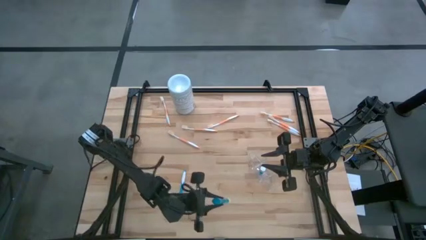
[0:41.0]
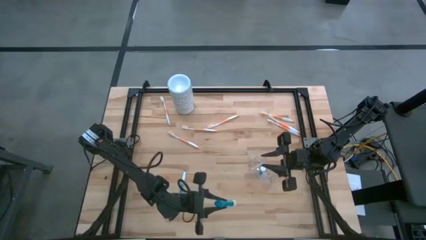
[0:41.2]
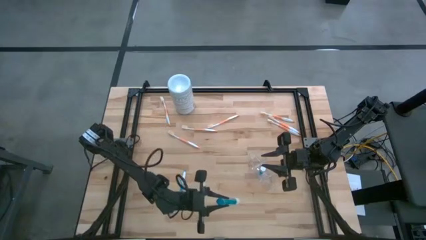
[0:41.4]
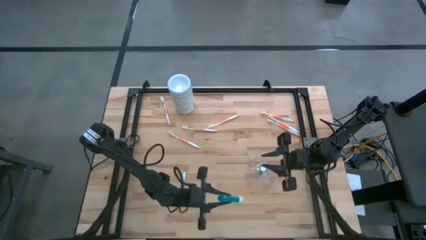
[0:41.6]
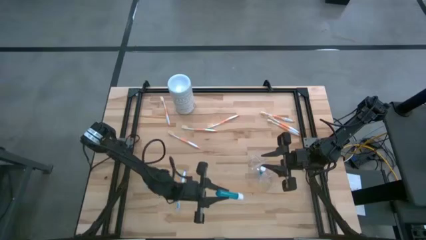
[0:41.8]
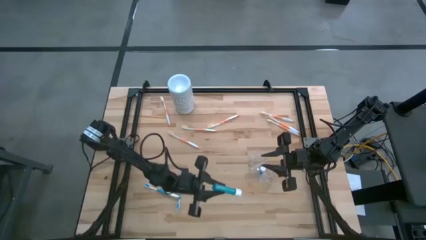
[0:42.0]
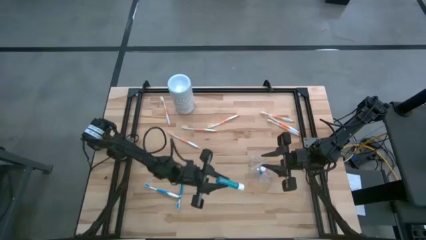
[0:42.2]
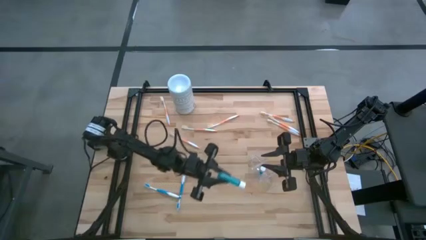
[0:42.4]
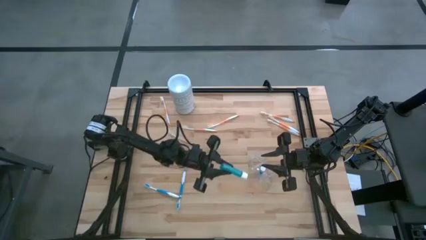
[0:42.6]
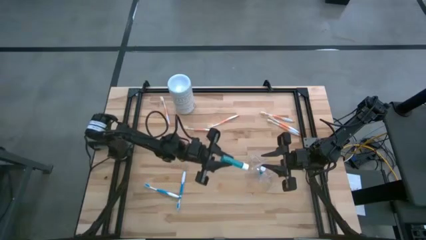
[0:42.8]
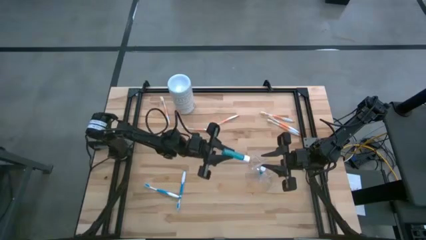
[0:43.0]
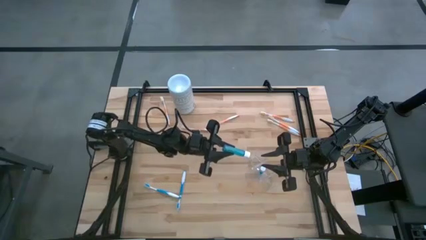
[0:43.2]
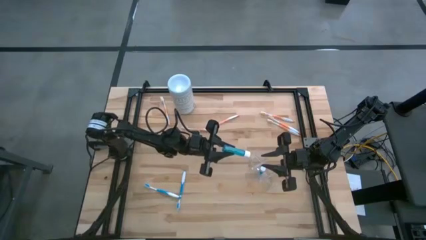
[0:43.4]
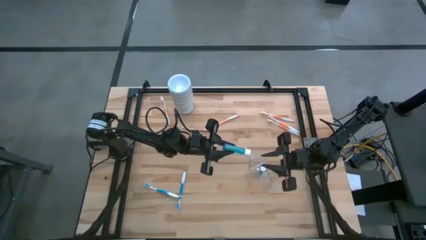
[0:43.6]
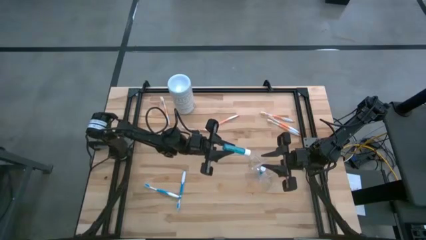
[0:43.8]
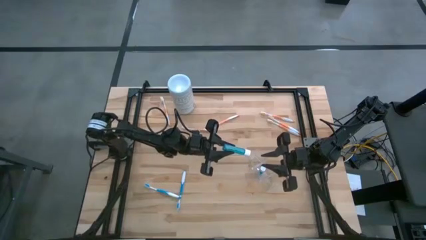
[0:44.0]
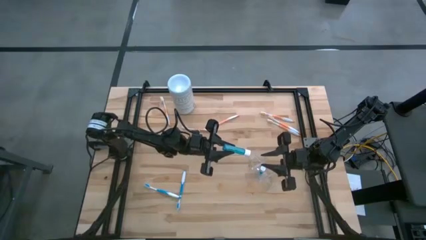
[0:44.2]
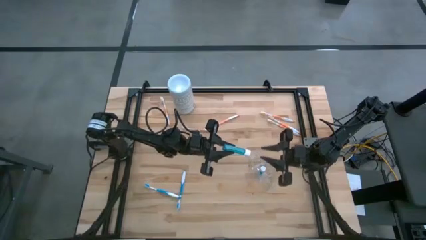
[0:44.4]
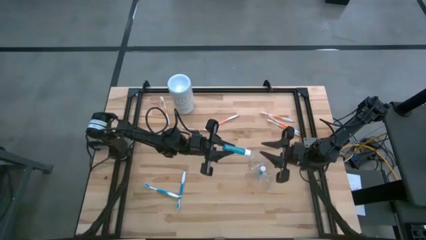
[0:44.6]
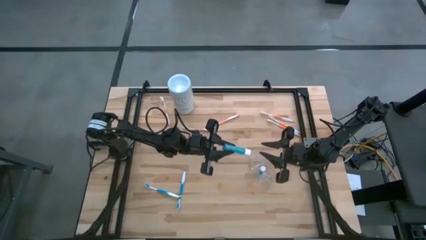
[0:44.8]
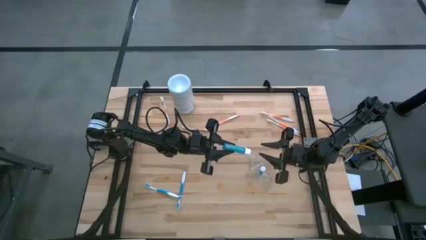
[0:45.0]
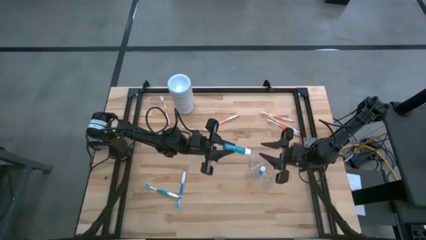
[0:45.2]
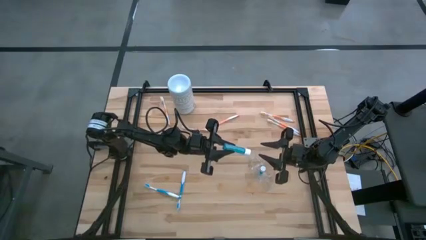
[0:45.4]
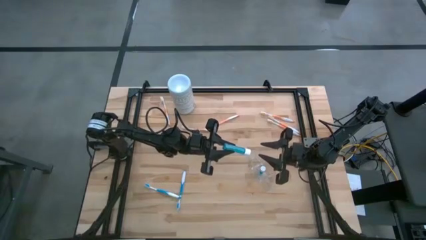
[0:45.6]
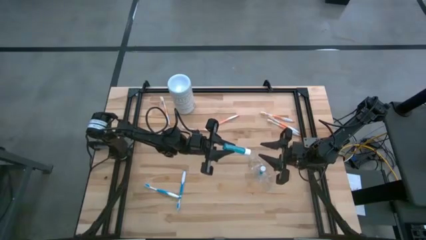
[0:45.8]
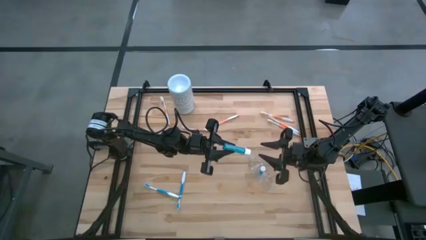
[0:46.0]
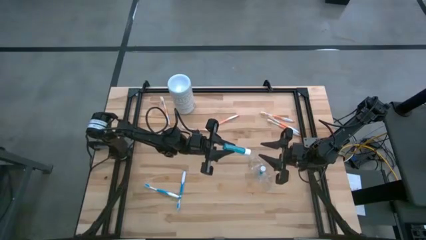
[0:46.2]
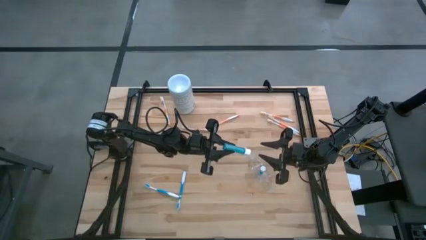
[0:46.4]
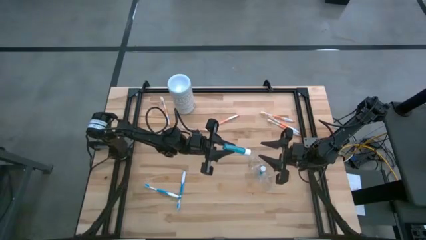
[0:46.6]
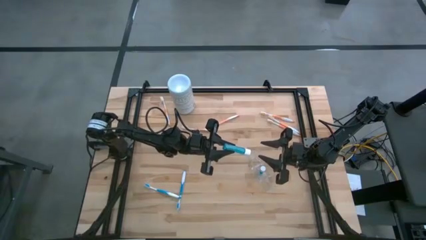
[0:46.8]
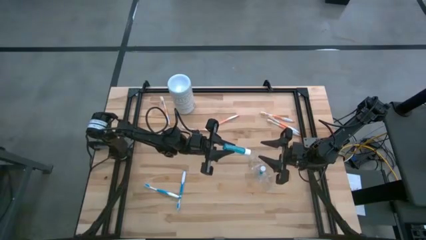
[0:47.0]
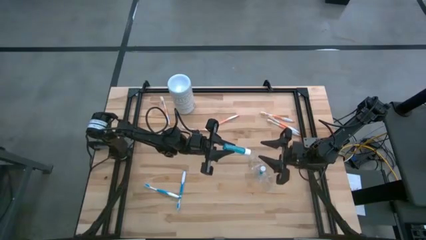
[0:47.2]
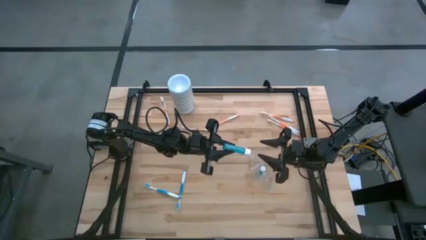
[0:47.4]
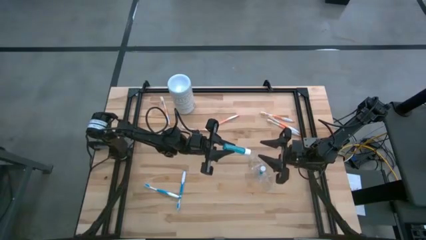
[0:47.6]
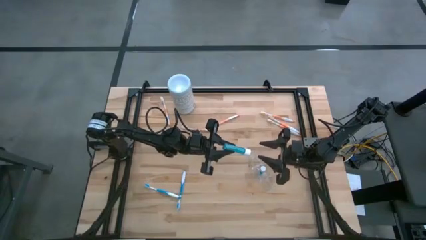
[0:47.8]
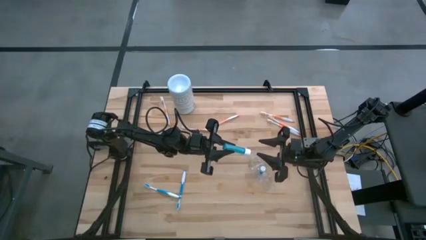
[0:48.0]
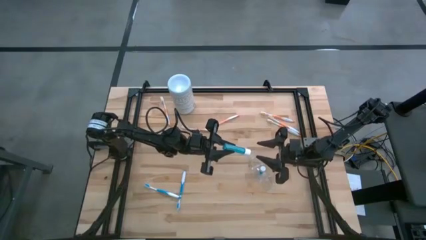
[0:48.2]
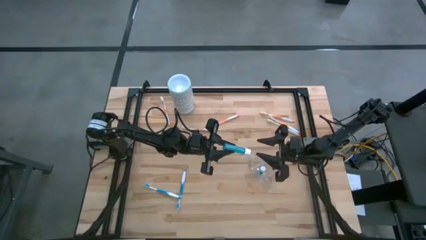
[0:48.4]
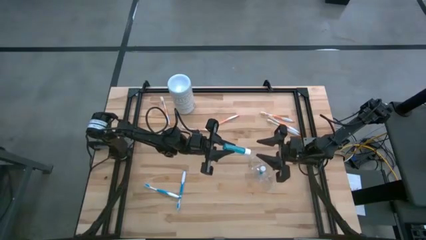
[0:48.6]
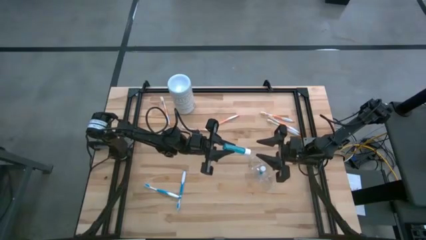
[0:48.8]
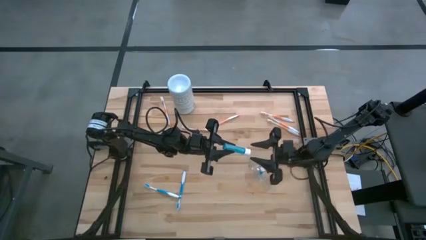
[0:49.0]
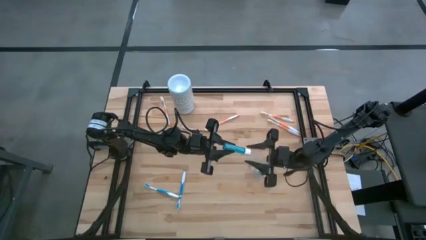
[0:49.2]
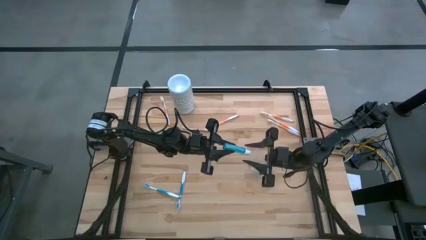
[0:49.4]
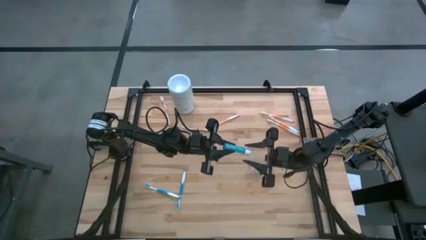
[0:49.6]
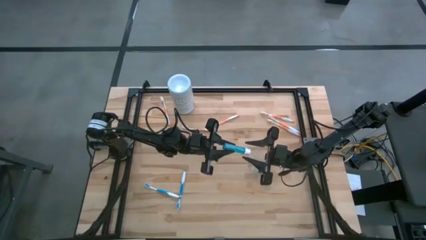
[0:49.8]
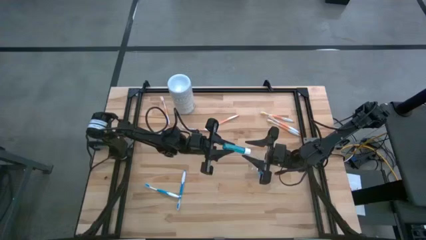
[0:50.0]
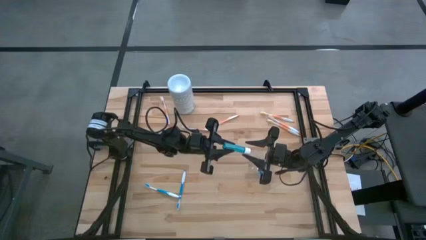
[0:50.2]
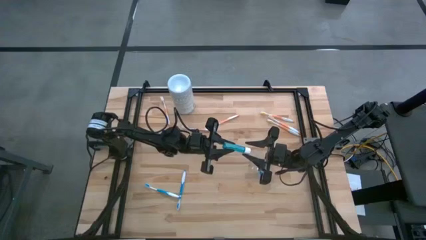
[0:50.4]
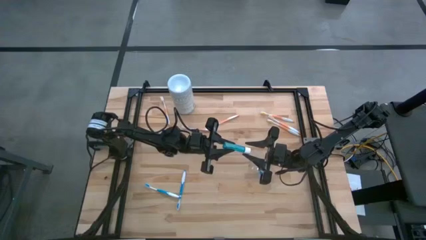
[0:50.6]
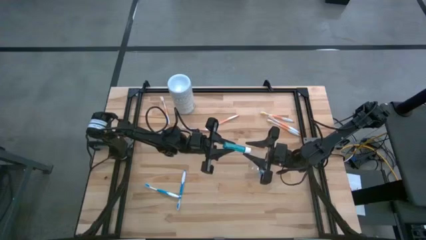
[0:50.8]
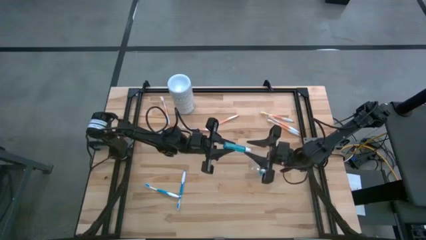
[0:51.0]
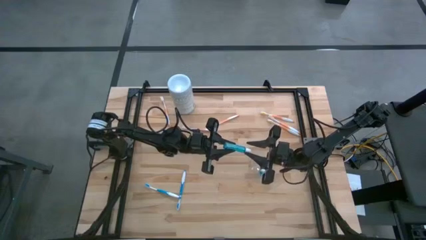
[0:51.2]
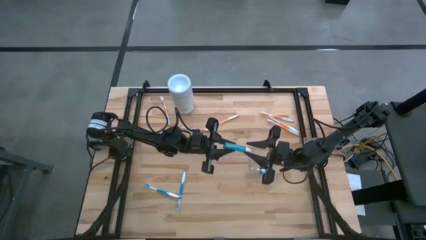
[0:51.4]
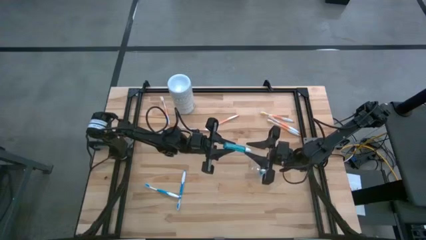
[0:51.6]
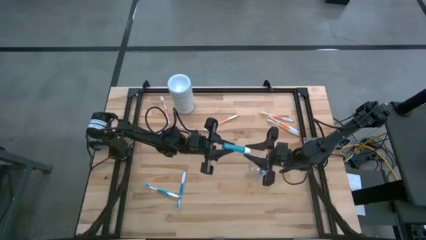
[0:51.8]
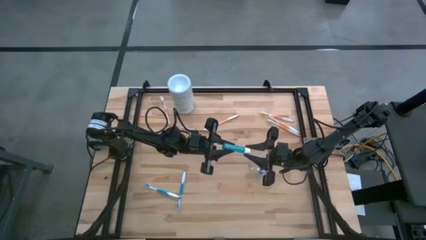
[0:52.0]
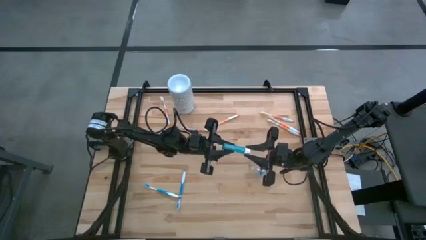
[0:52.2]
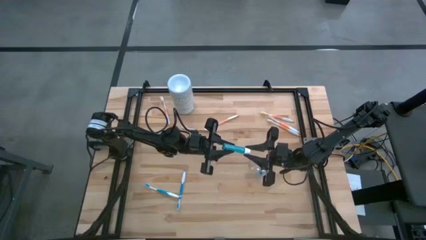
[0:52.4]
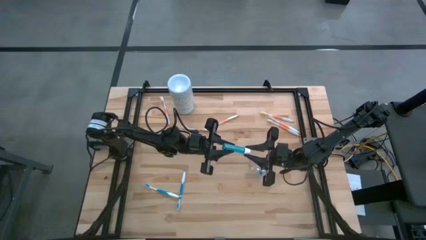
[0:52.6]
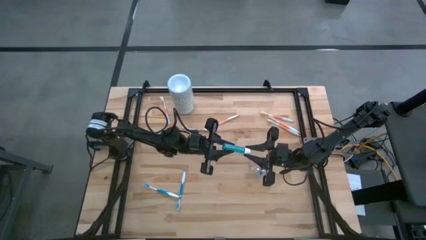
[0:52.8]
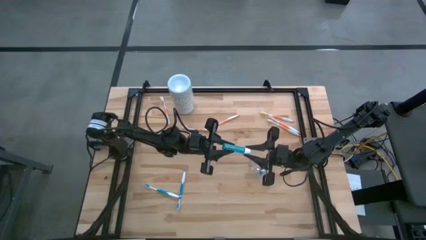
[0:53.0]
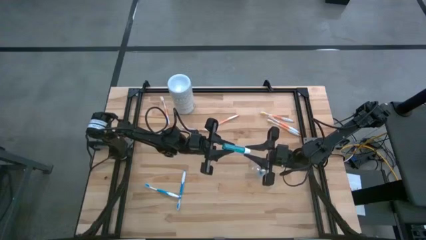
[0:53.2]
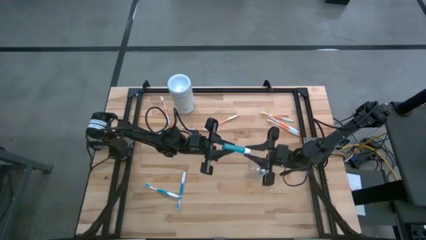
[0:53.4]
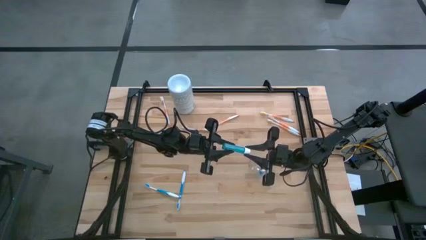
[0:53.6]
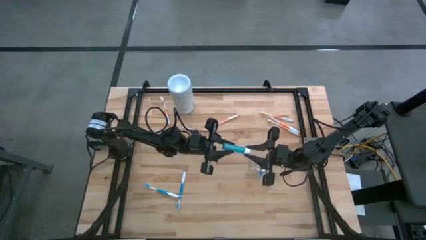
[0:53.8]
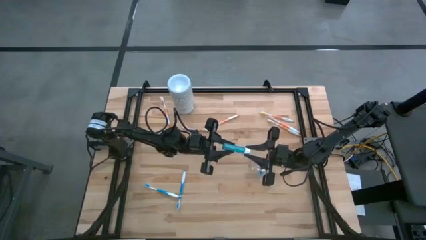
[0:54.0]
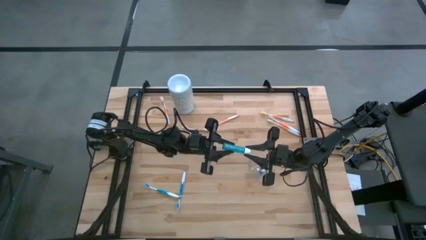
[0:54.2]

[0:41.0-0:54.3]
Task: Pick & Place toothbrushing station
Put the mouthwash into the middle section of the transparent organizer

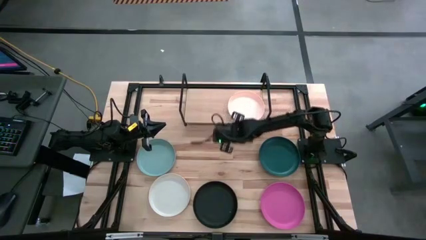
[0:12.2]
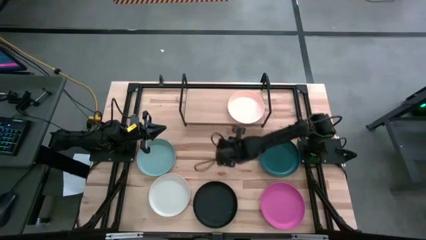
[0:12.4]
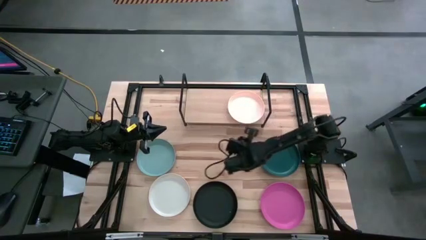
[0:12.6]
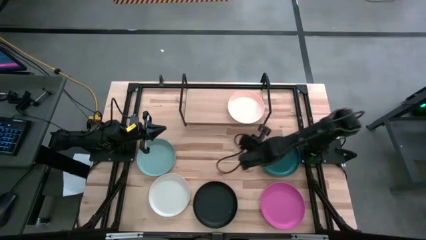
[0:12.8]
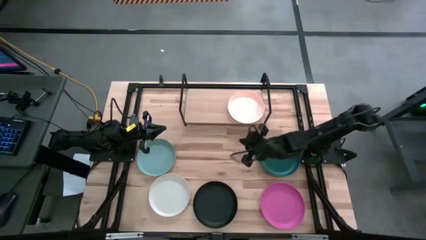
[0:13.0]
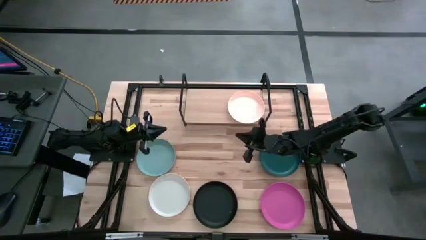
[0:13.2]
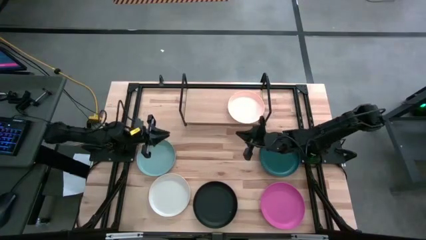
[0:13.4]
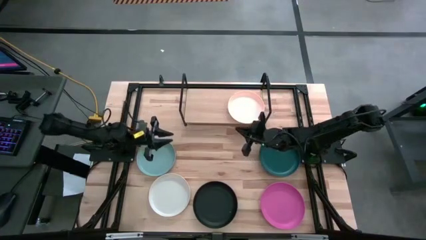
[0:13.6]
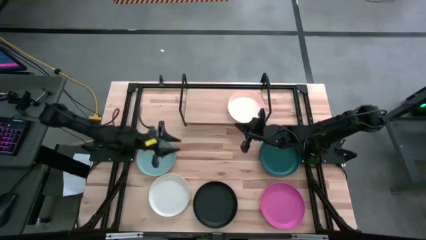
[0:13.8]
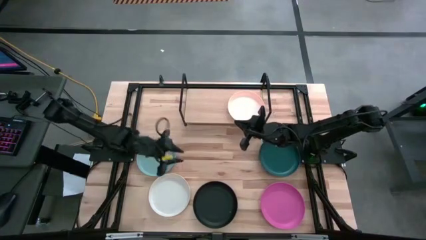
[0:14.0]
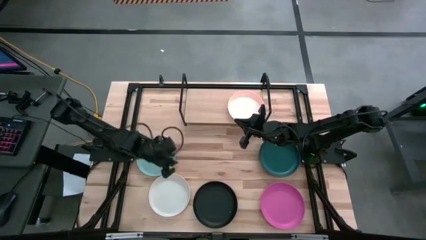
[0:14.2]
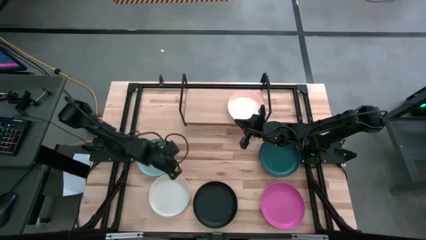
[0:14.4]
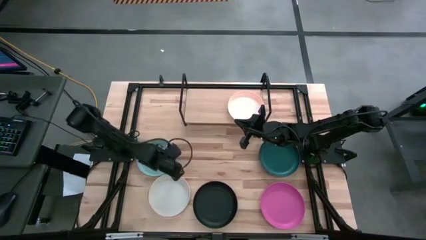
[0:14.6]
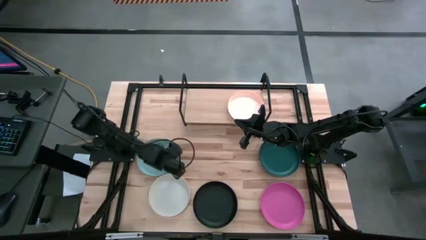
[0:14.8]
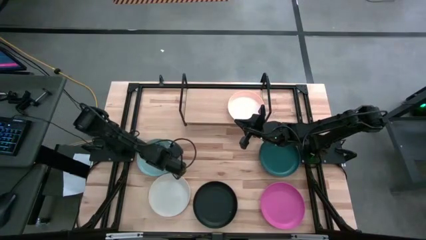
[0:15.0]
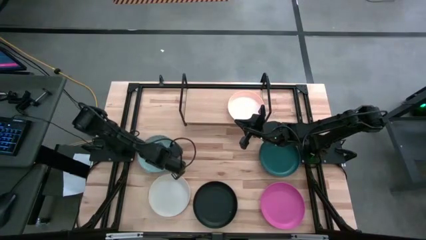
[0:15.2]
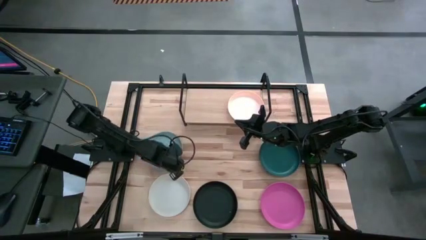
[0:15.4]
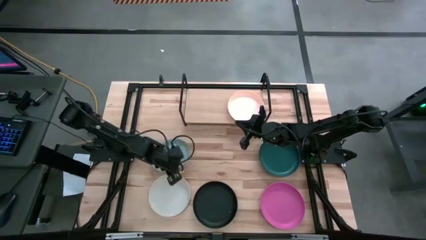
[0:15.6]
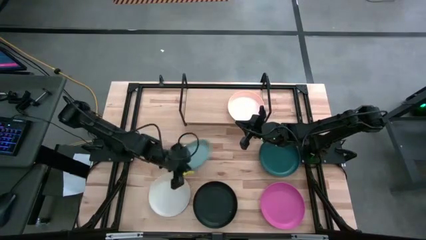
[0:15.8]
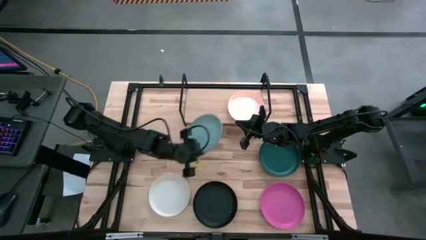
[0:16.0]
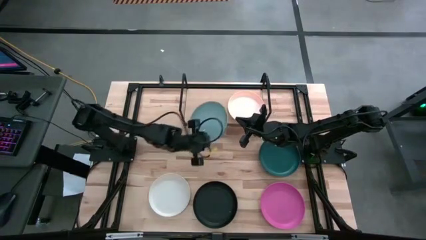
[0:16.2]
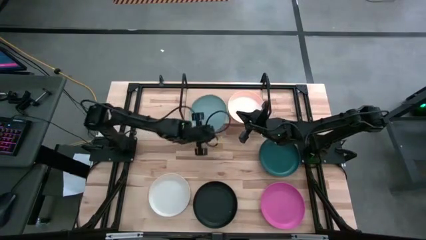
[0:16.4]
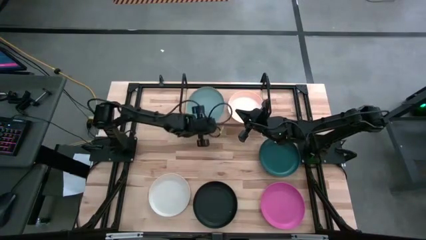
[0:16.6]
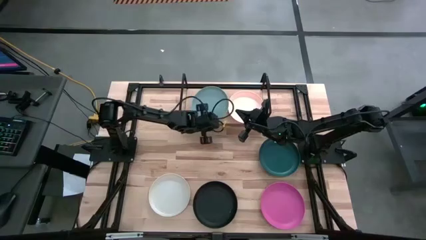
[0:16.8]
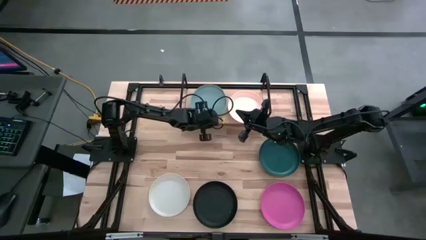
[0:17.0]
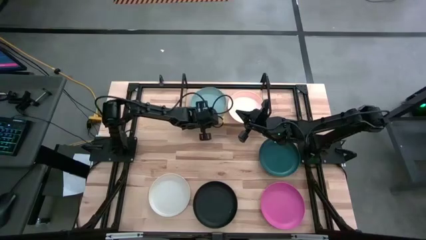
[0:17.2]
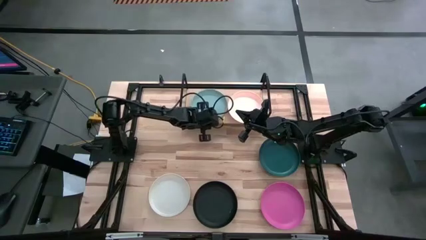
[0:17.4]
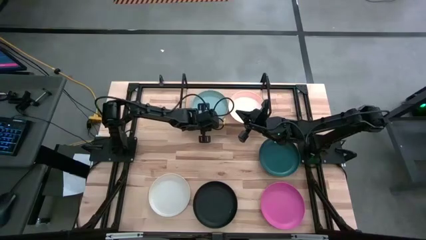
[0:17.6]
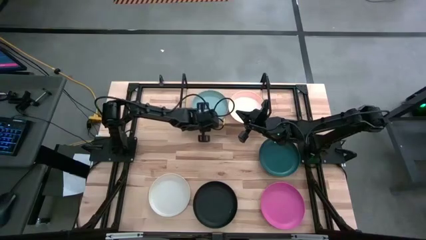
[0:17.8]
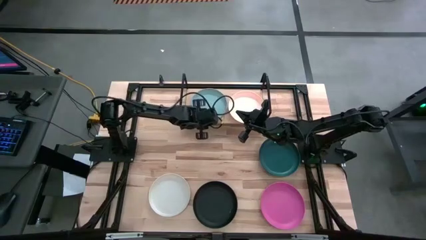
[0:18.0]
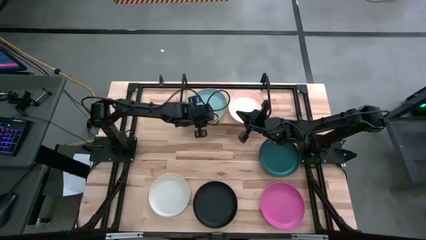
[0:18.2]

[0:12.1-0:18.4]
Task: Place and stack plates onto a shelf
Stack the light blue plate on top of the light orange plate on the shelf
